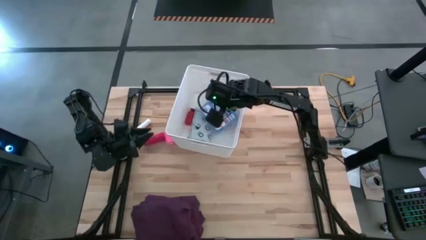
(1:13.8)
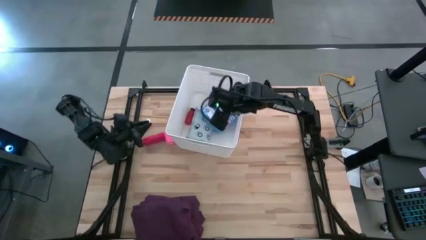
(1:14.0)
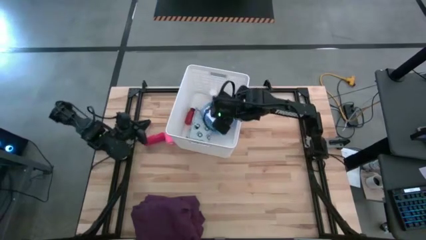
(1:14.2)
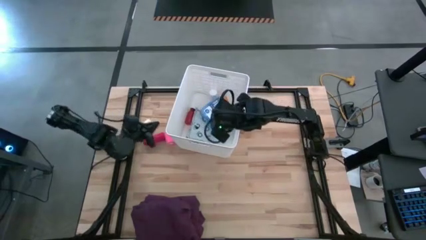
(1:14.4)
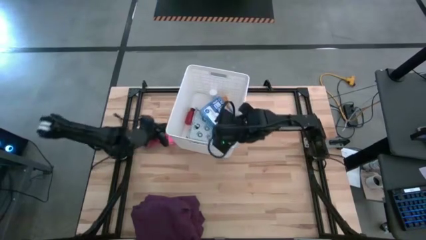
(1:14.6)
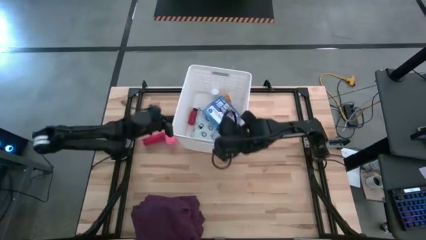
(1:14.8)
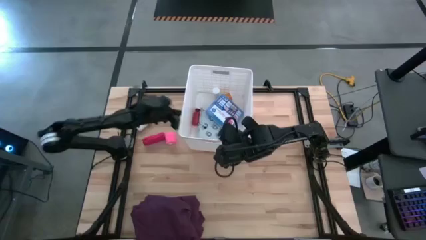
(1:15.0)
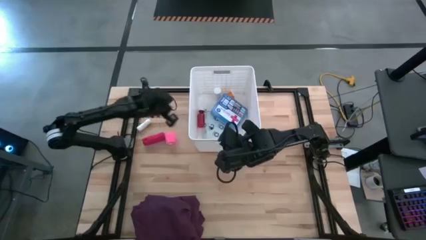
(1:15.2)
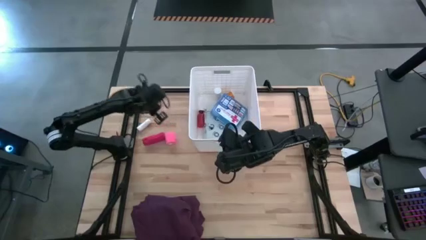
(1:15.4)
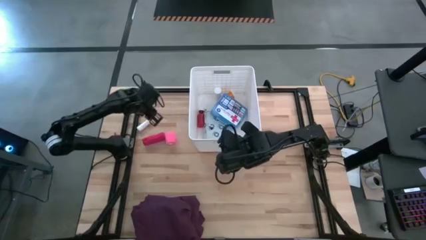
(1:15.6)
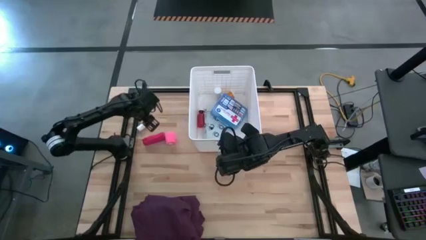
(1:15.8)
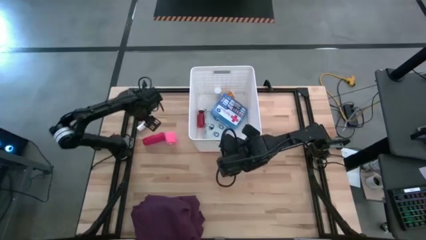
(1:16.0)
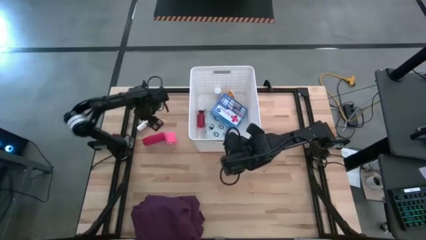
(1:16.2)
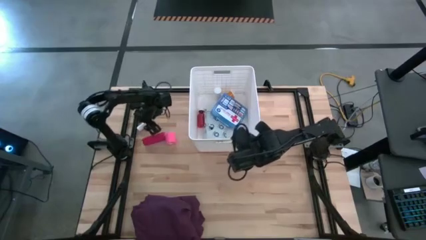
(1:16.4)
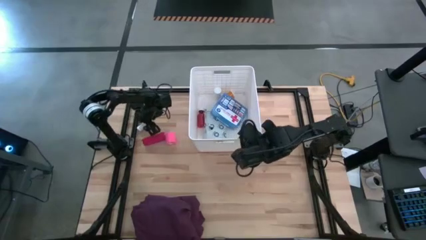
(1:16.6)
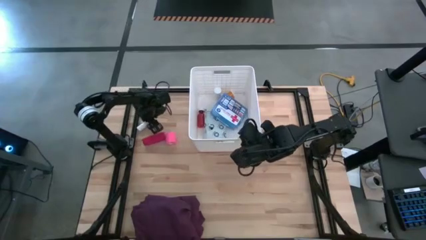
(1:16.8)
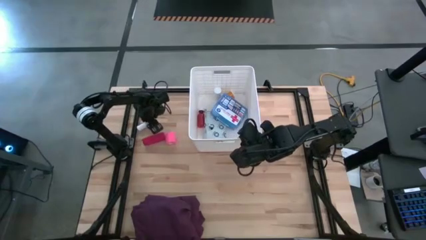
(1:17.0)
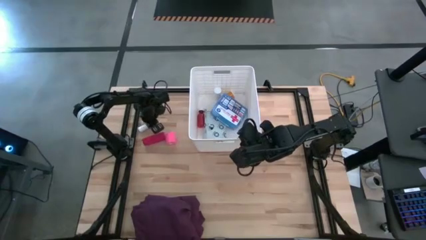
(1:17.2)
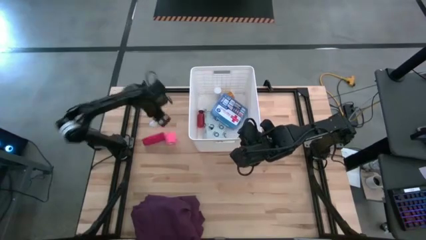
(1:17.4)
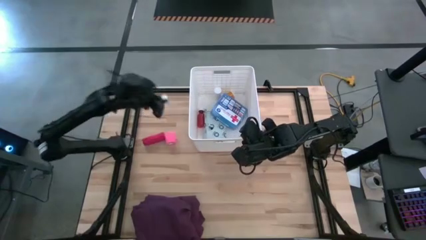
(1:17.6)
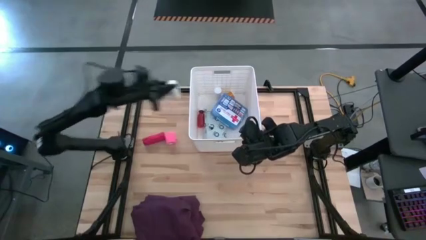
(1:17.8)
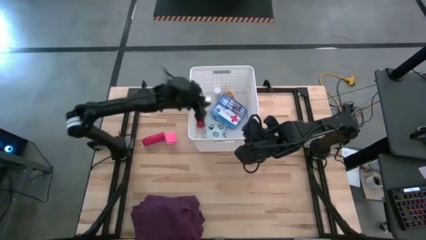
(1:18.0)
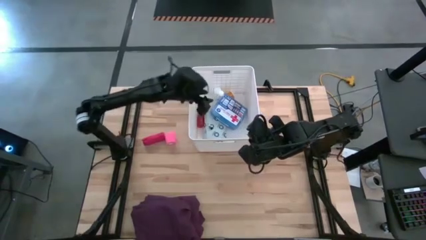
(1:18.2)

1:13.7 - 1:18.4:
Task: Pick & place medical supplies in basket/bin
Put the white rolled gauze into the white bin

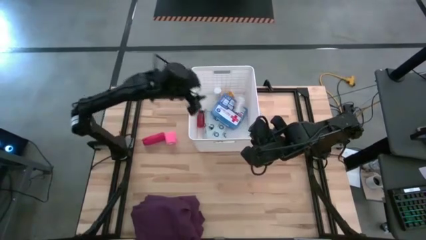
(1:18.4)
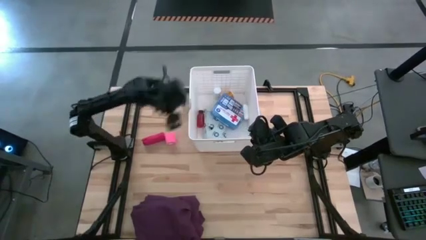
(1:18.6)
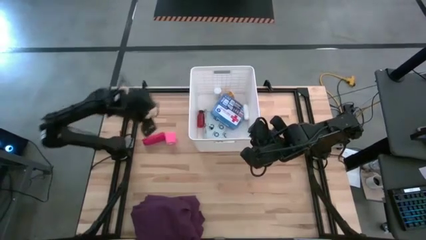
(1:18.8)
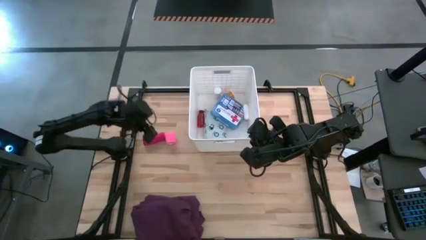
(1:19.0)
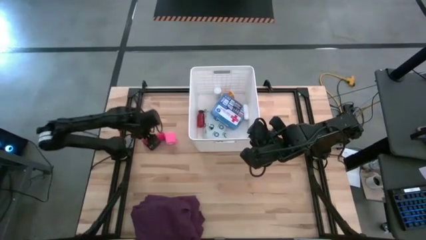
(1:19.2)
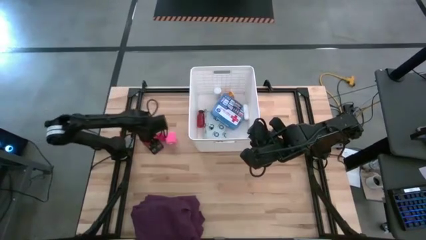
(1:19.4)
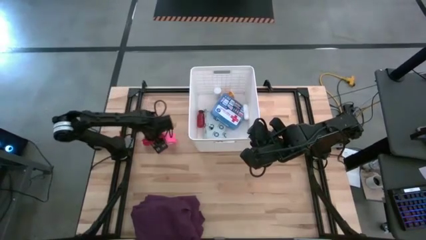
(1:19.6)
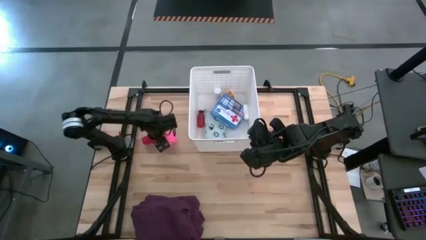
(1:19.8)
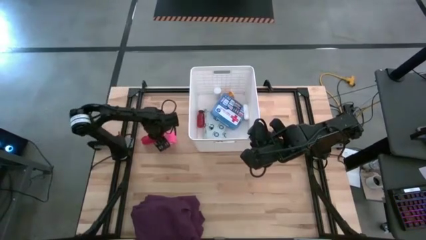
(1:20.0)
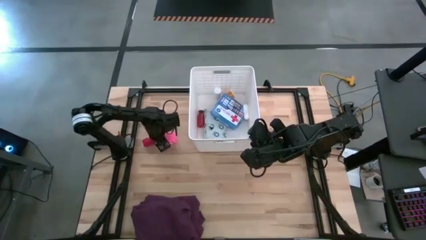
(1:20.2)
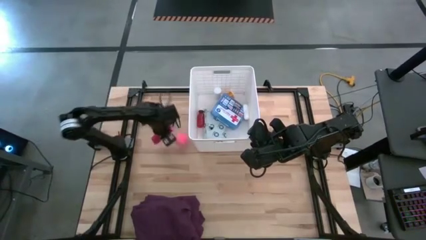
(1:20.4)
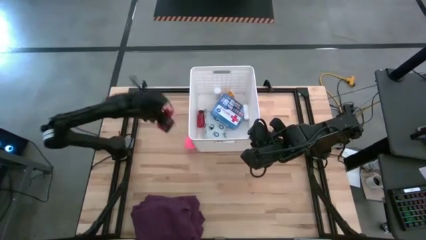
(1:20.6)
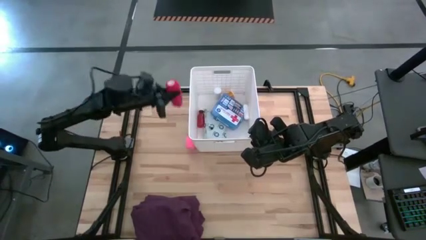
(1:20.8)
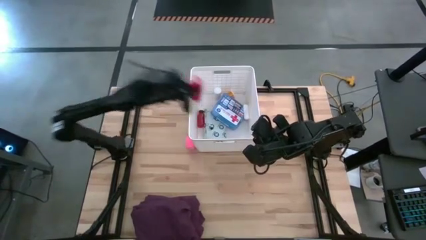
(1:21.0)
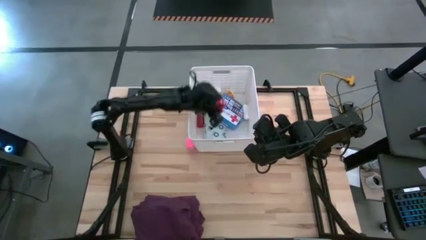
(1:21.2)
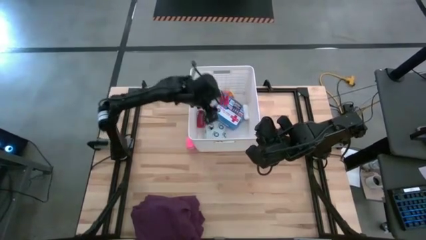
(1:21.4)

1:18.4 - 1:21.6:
Put the red bandage into the white bin

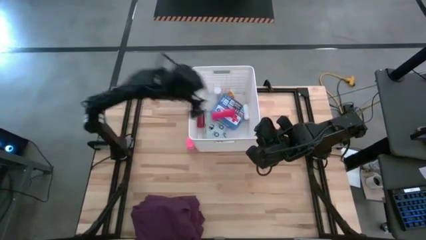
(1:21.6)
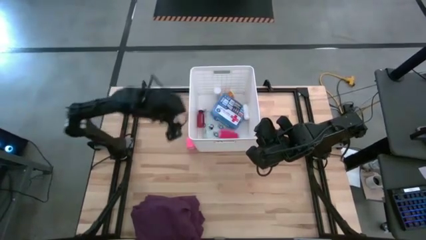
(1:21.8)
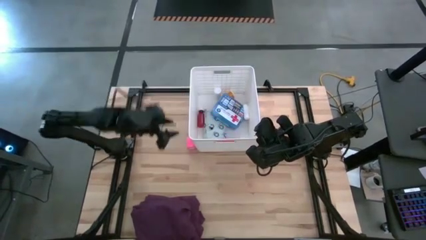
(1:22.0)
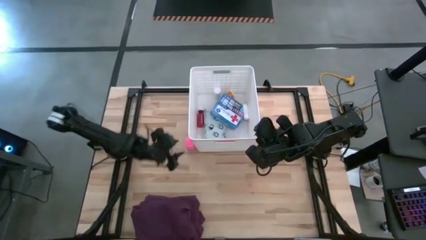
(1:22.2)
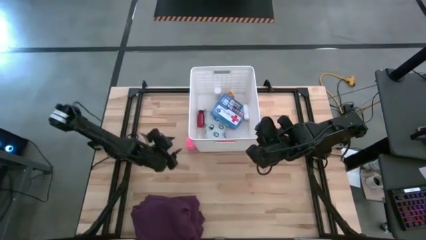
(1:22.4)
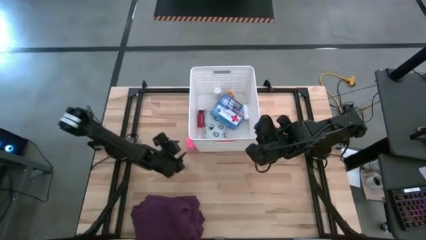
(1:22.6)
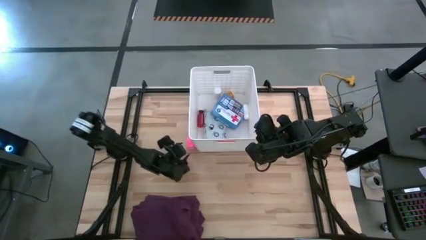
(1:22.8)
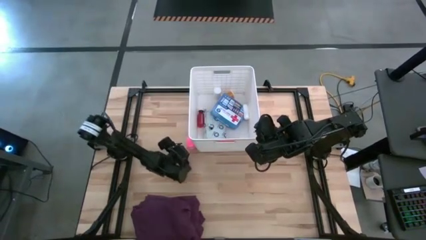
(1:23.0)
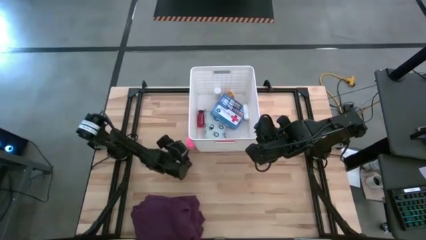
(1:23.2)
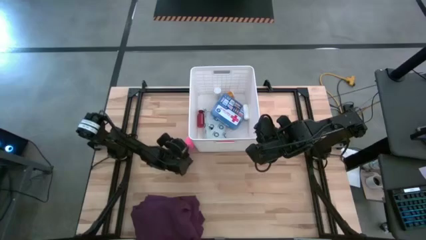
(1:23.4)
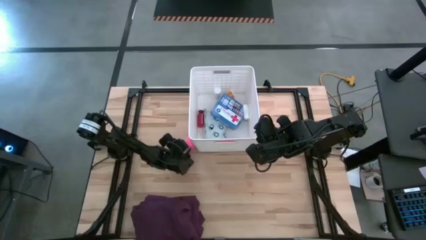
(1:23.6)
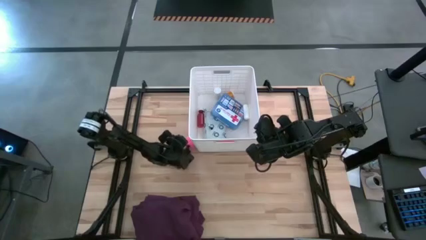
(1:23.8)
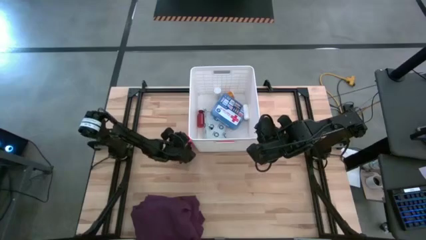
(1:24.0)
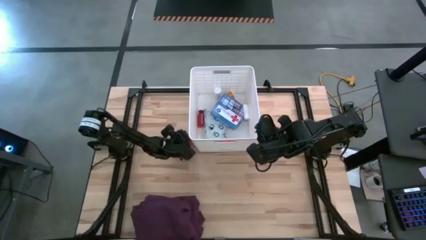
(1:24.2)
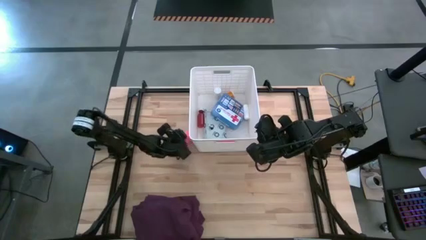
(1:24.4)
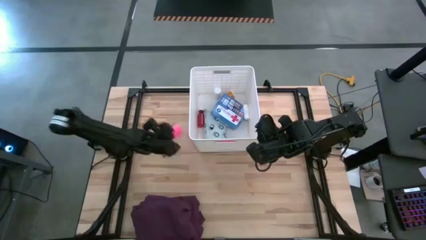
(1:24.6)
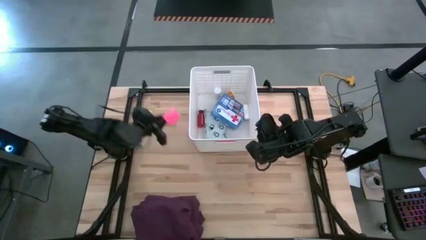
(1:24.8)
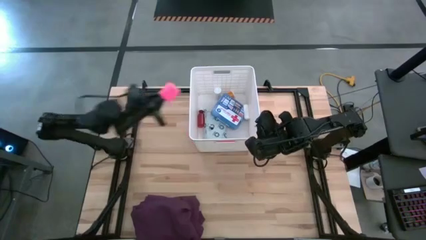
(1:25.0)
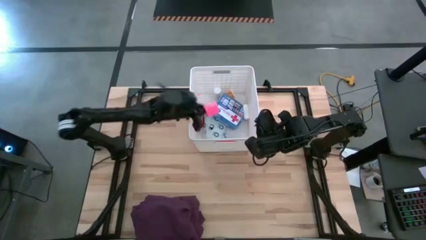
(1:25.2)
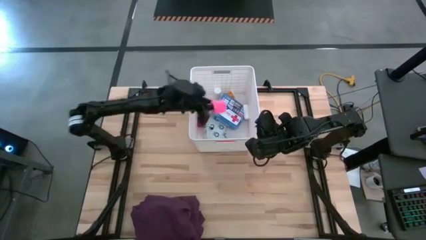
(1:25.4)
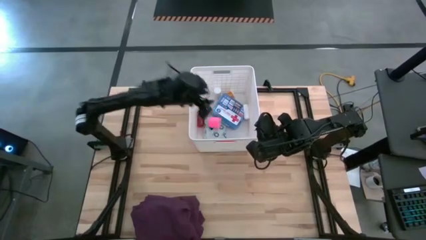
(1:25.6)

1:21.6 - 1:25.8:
Put the pink bandage into the white bin

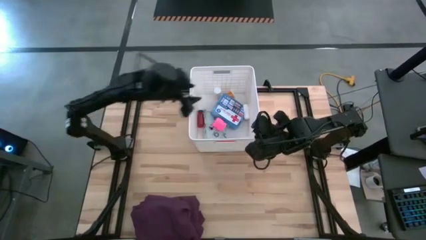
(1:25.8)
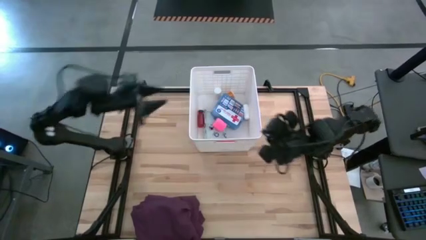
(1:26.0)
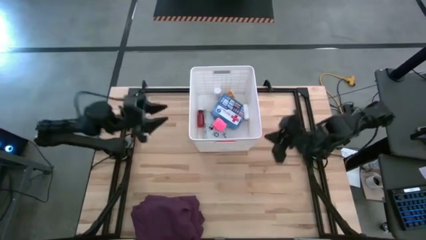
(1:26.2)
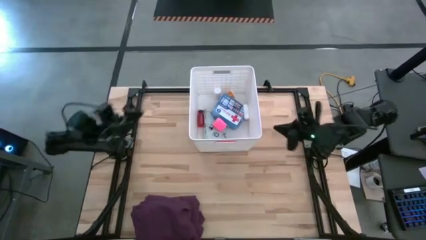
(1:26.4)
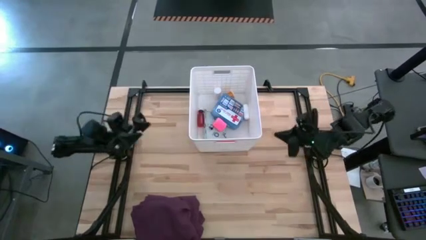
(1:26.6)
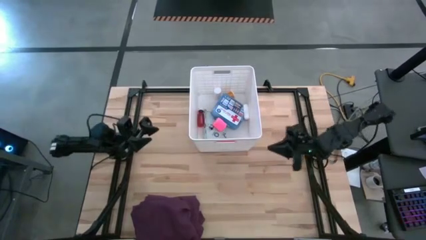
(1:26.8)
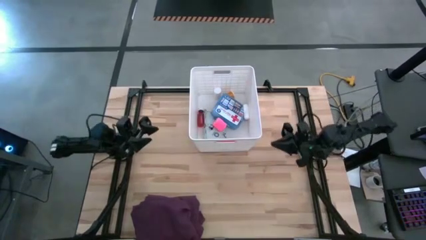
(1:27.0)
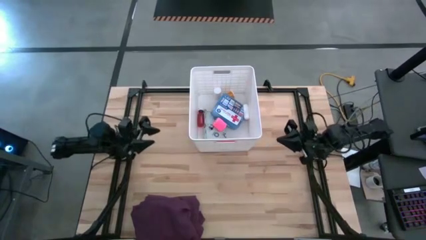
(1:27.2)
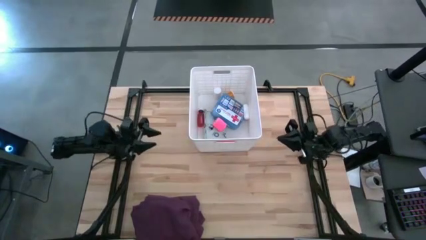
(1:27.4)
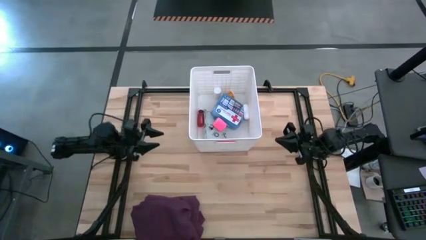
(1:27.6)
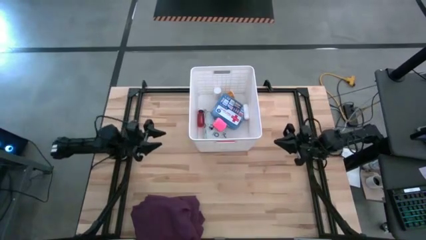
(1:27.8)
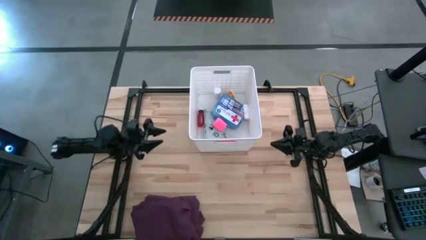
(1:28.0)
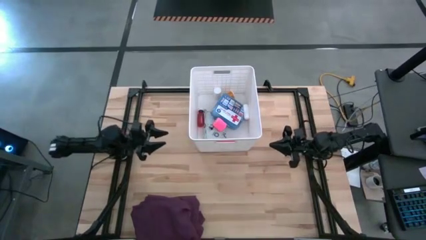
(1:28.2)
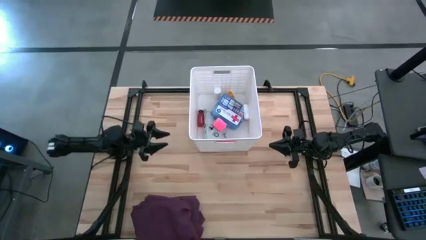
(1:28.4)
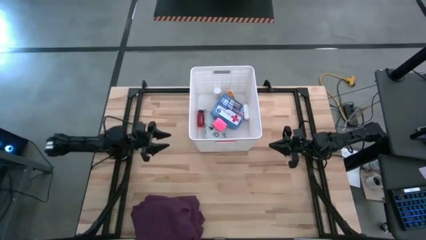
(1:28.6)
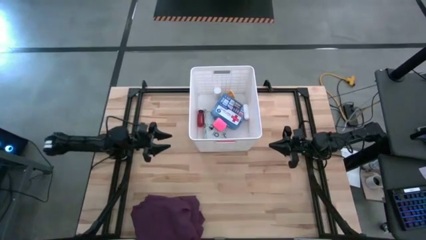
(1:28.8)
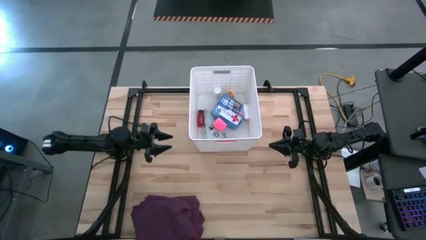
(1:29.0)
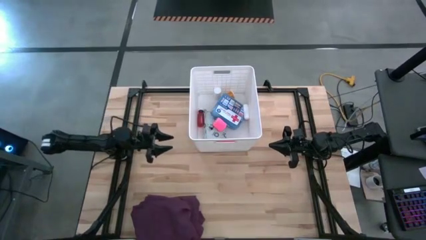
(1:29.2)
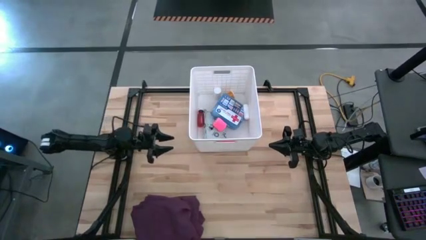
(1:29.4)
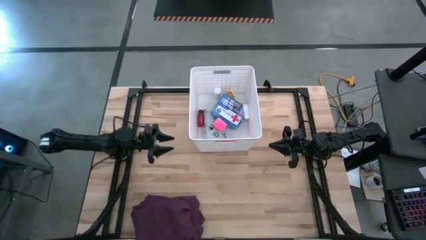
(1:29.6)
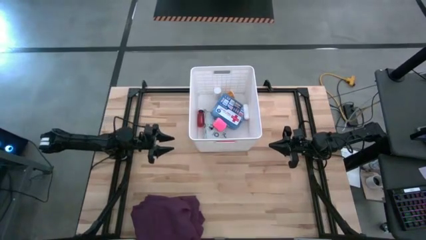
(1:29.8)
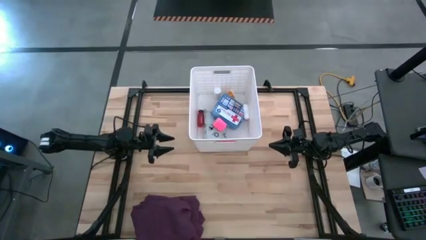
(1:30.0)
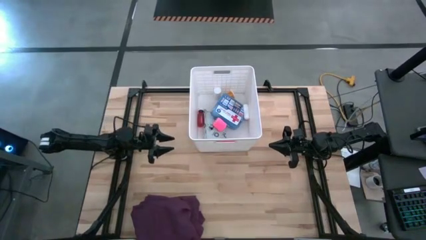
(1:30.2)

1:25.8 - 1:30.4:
Return to Home Position
